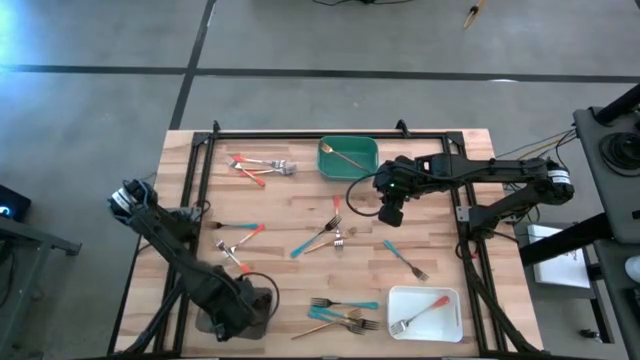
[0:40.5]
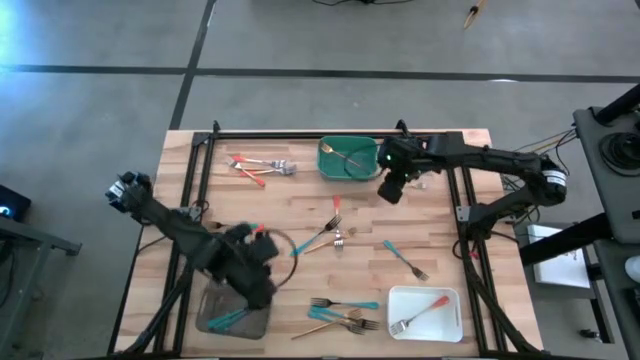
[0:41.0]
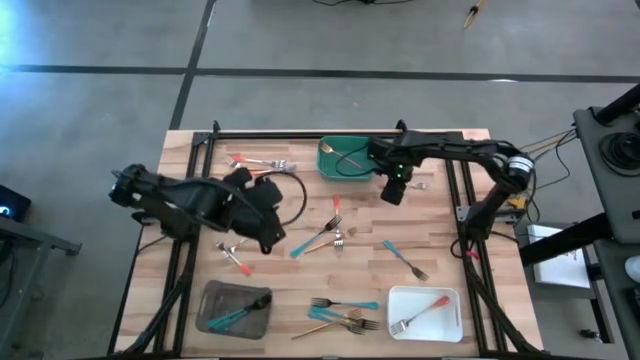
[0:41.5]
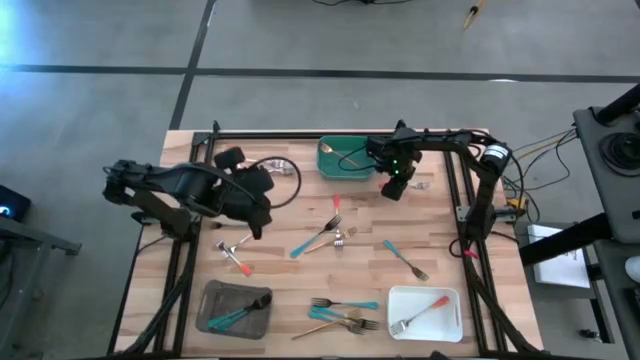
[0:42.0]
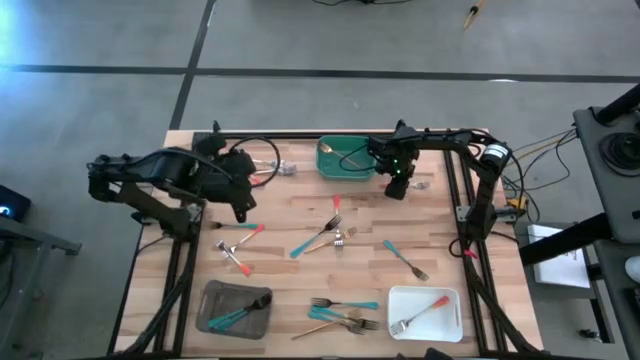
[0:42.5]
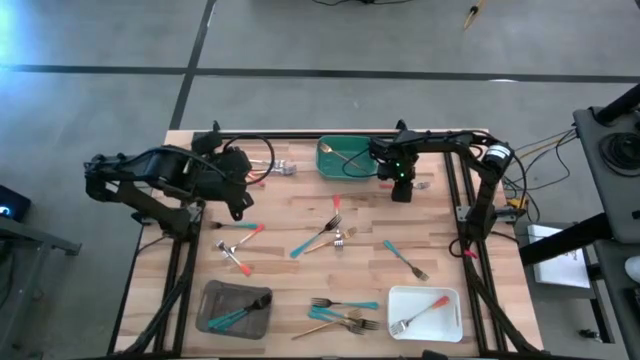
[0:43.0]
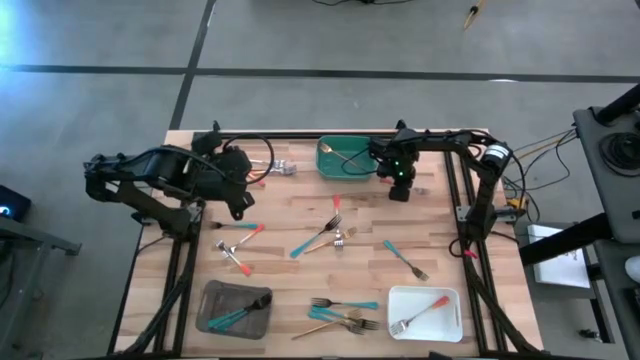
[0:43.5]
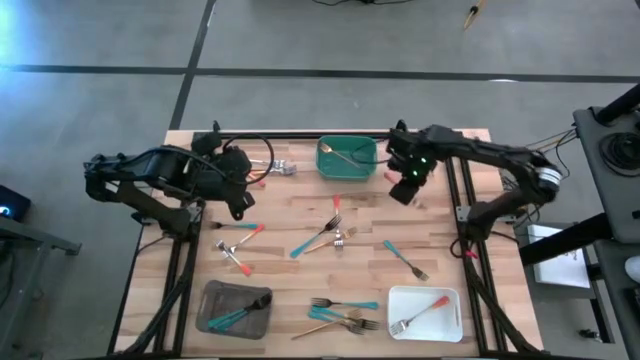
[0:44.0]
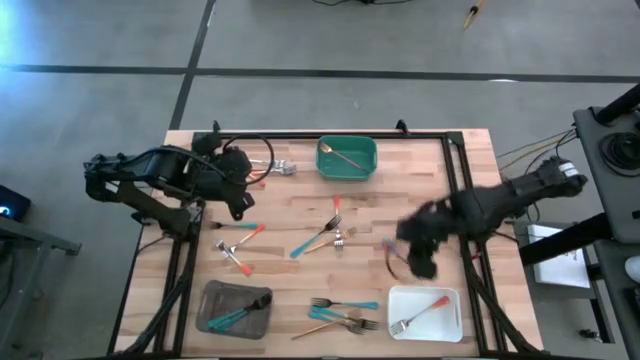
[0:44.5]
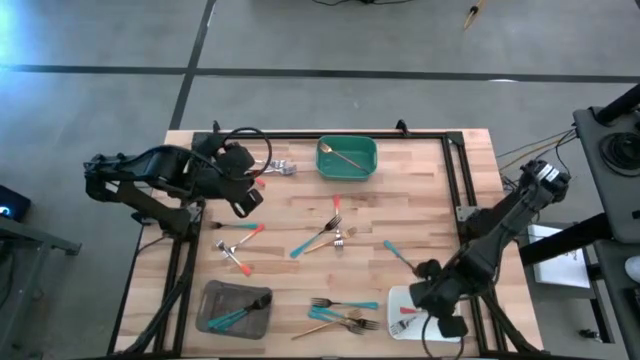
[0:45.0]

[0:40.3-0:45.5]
Task: Sort silverware by color (type)
Put the orange fork into the white bin

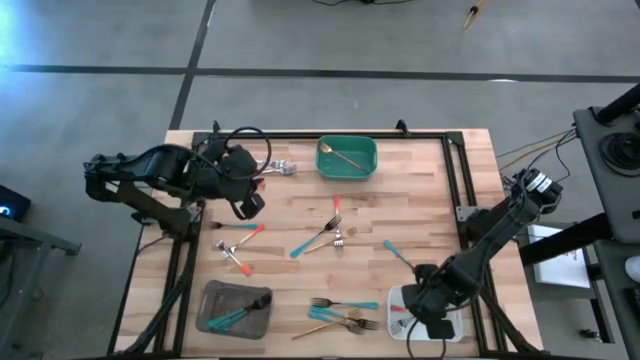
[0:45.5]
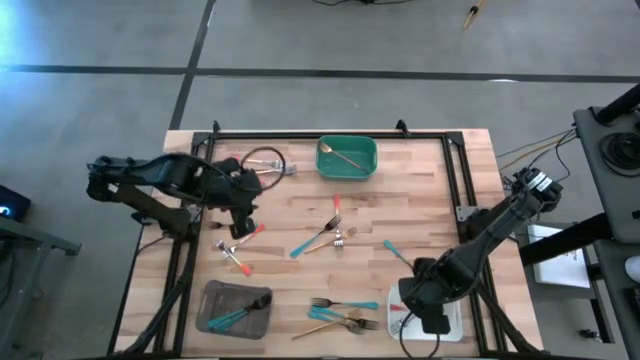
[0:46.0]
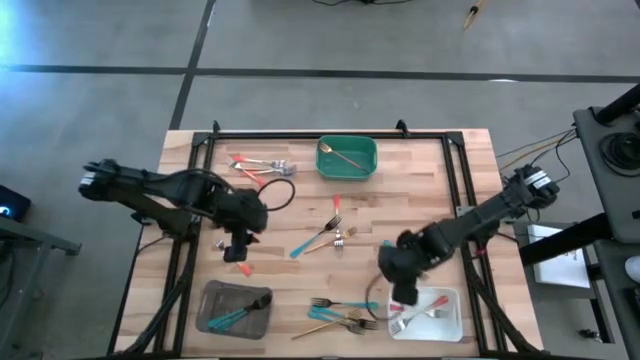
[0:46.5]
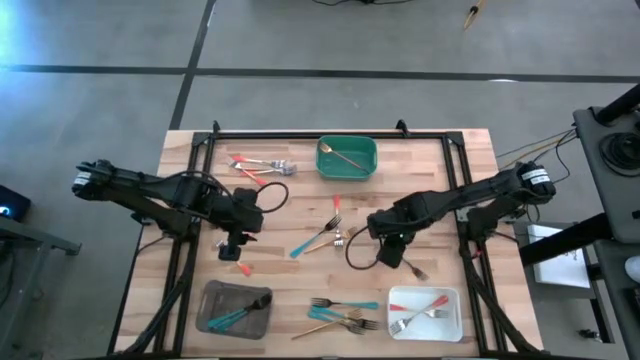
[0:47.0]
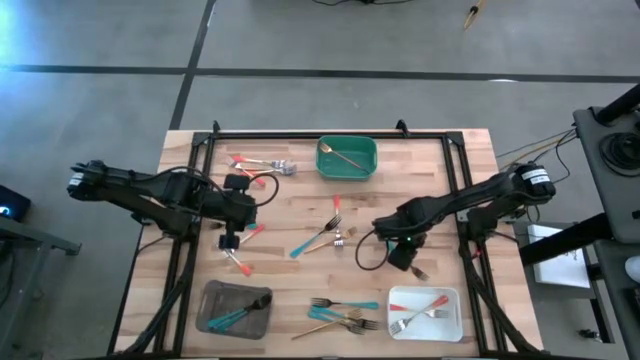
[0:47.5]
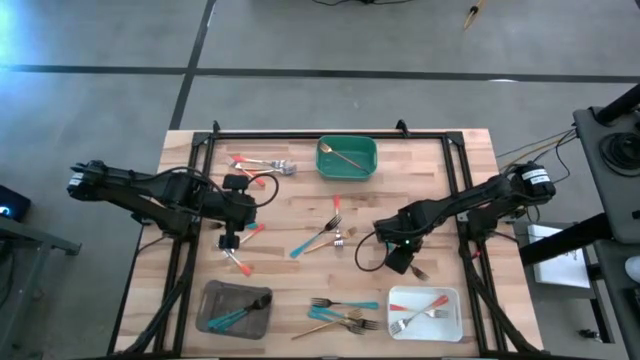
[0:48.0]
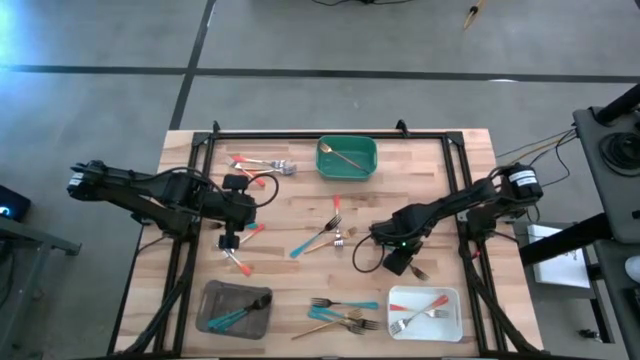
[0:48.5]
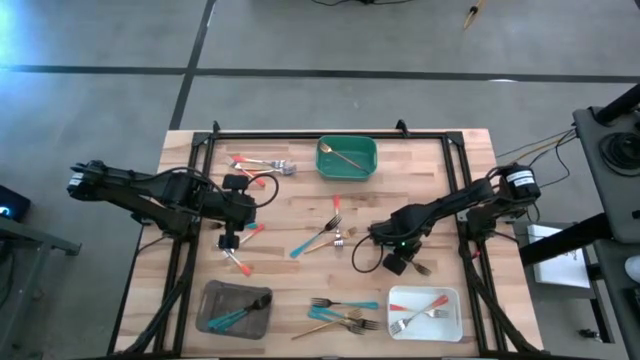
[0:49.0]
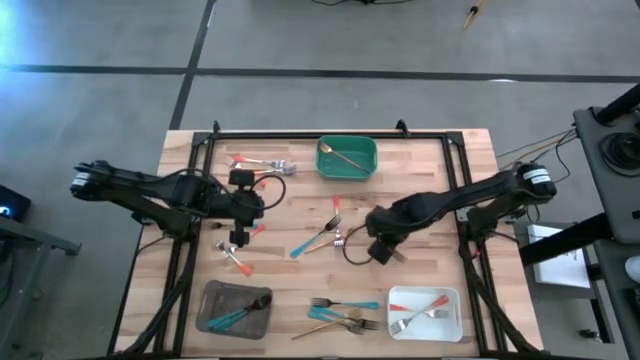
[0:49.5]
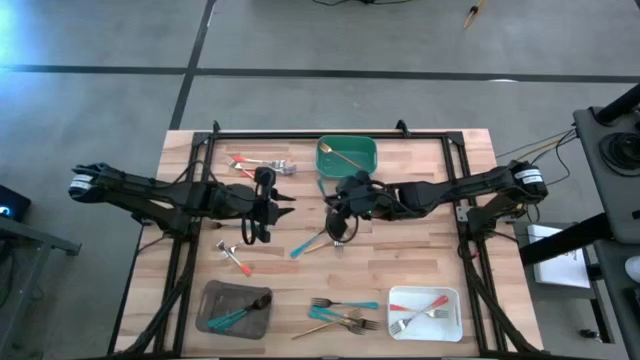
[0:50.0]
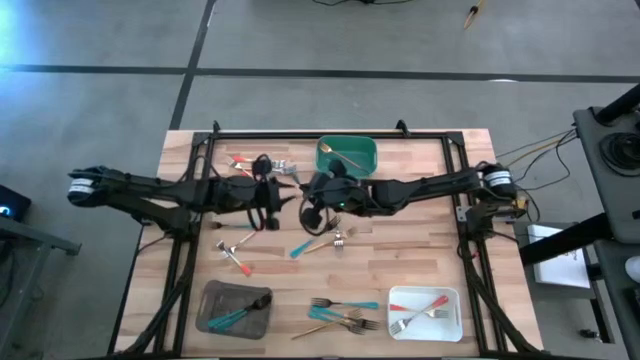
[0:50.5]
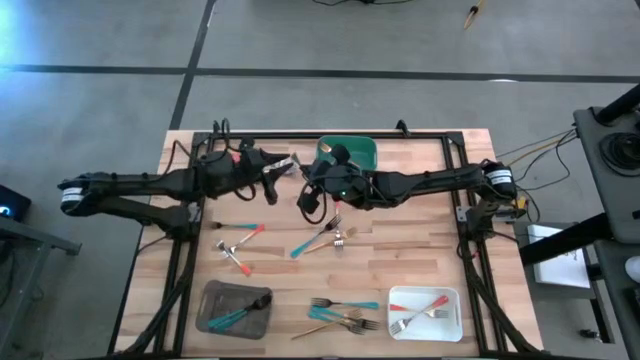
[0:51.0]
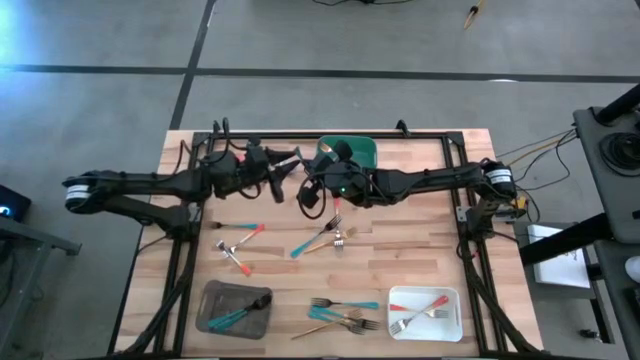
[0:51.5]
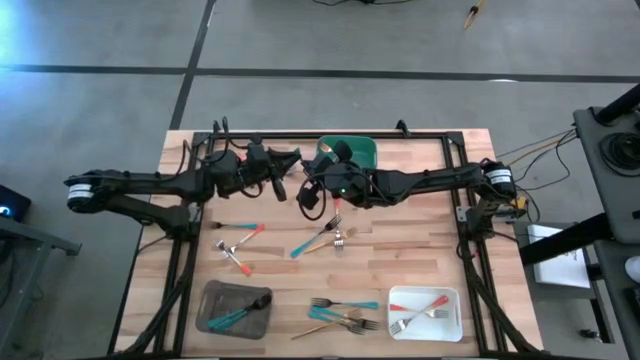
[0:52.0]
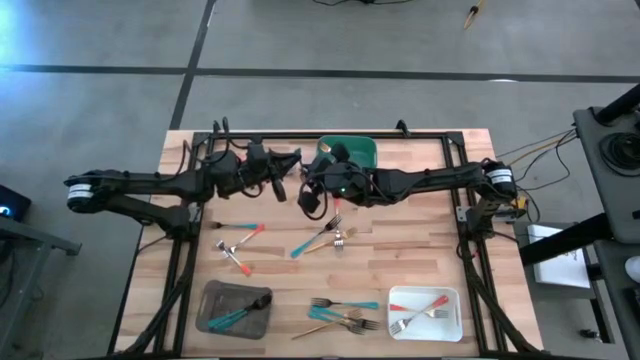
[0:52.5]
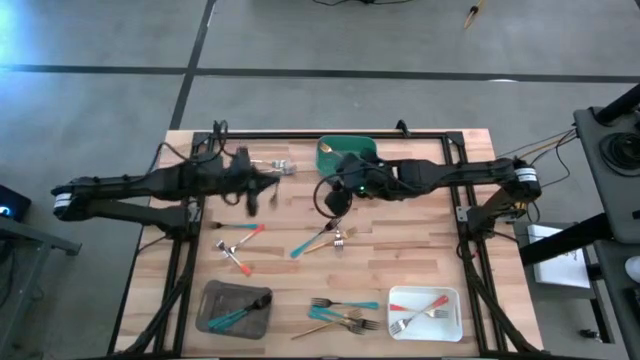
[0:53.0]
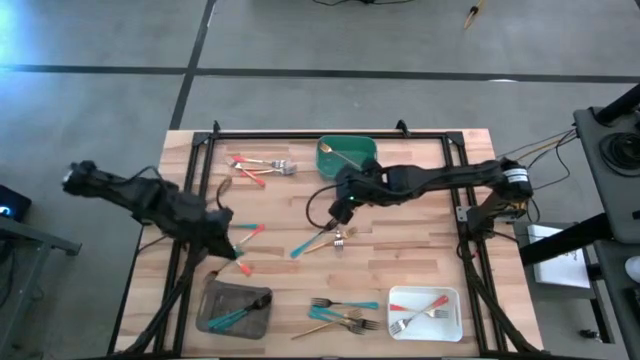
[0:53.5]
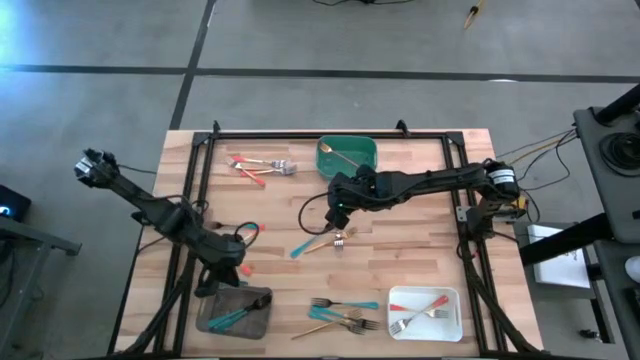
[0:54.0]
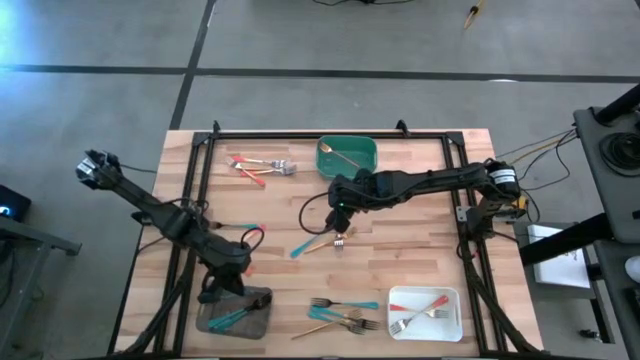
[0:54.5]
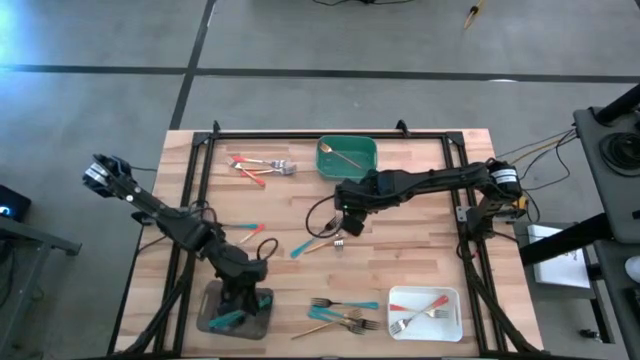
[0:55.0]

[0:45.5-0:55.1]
Put the blue fork into the black bin

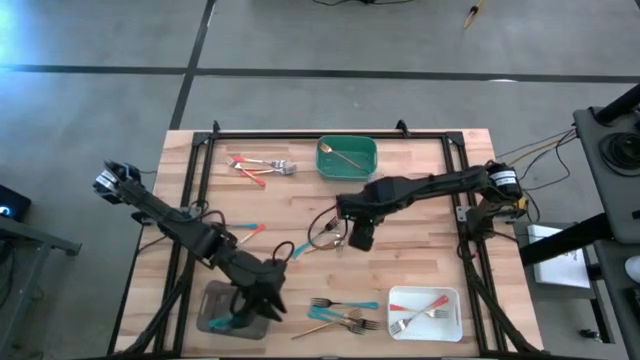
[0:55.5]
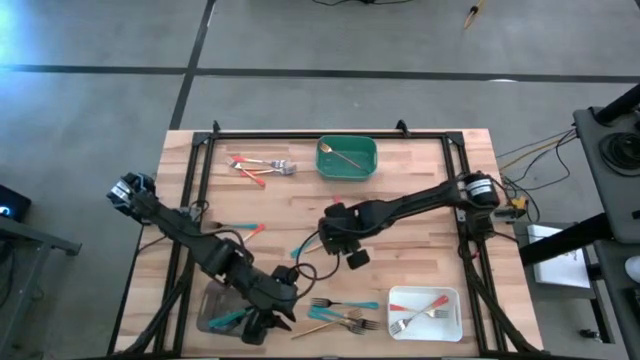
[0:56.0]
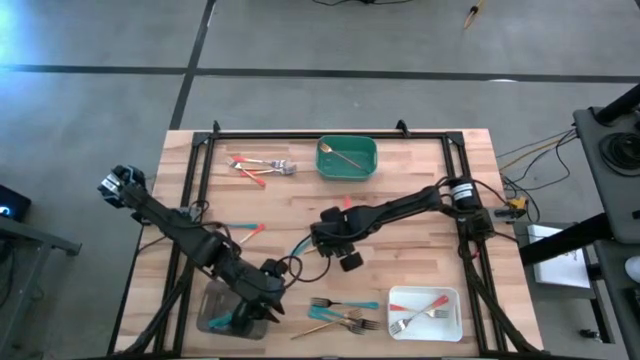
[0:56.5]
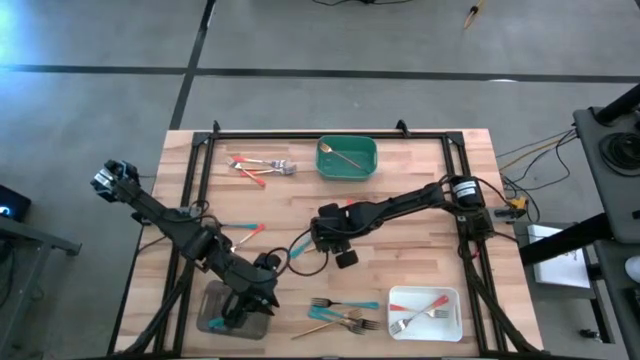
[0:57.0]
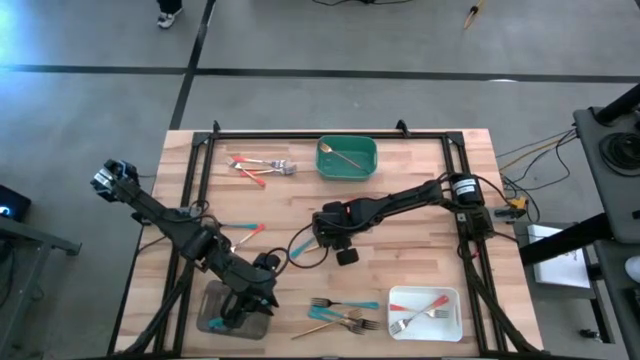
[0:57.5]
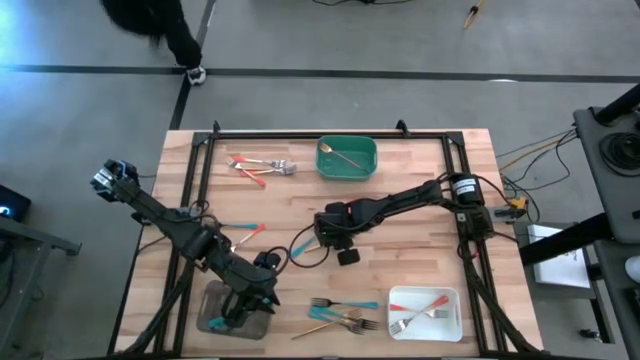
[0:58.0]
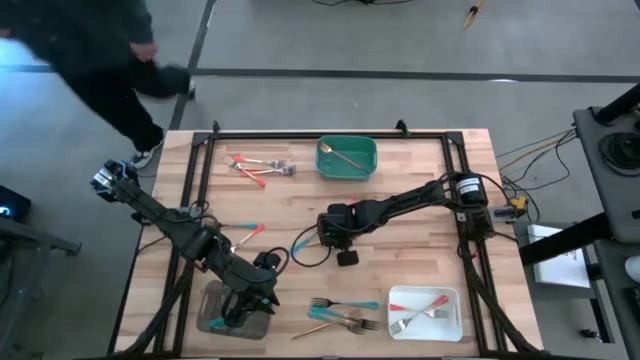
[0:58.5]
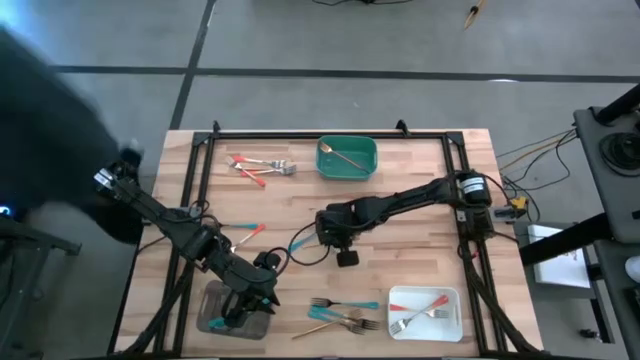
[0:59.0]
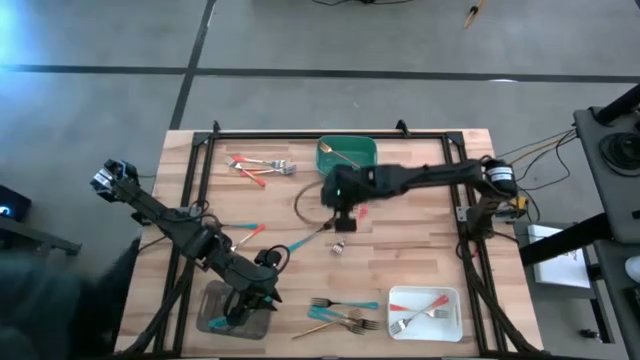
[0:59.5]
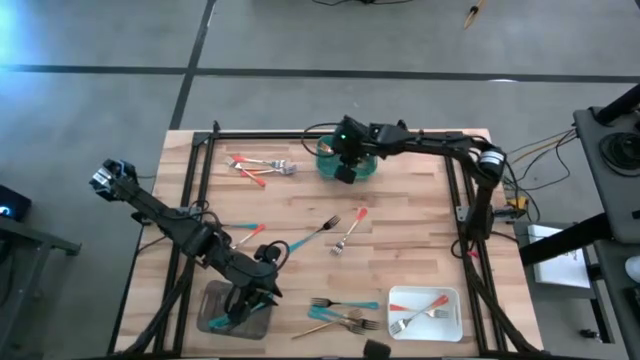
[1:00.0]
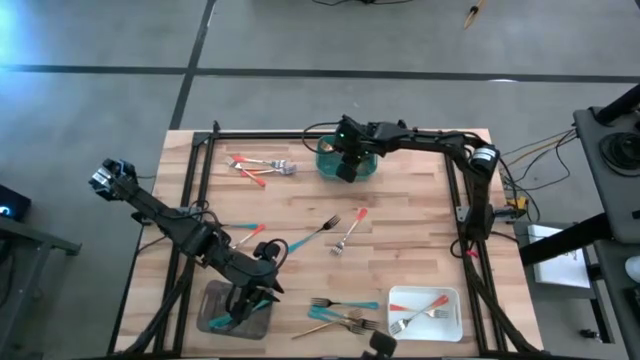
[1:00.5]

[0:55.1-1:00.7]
Put the gold fork into the blue bin

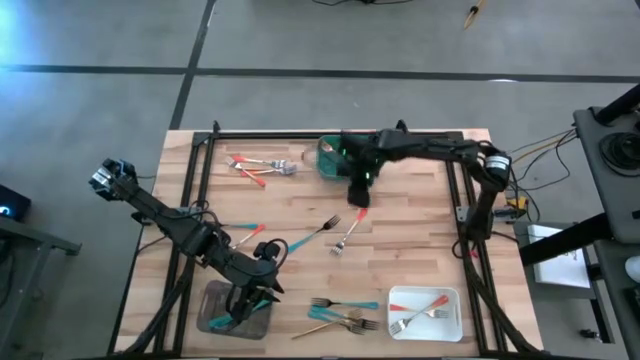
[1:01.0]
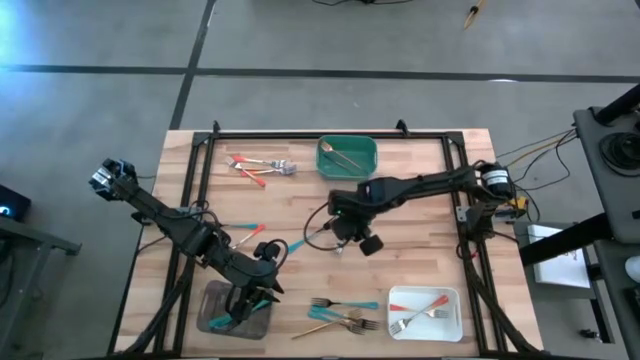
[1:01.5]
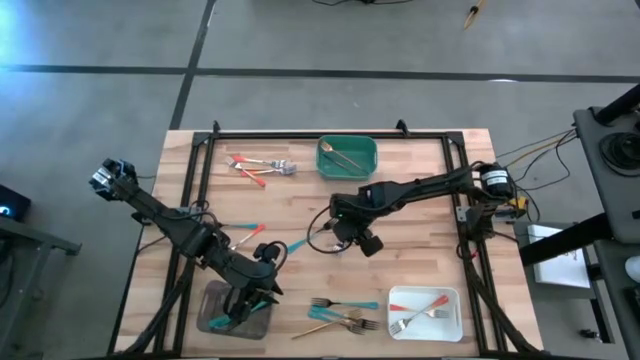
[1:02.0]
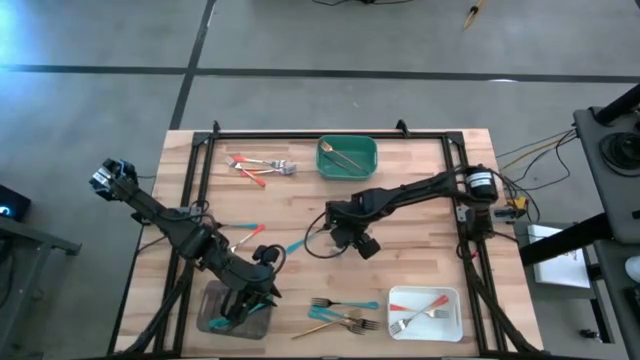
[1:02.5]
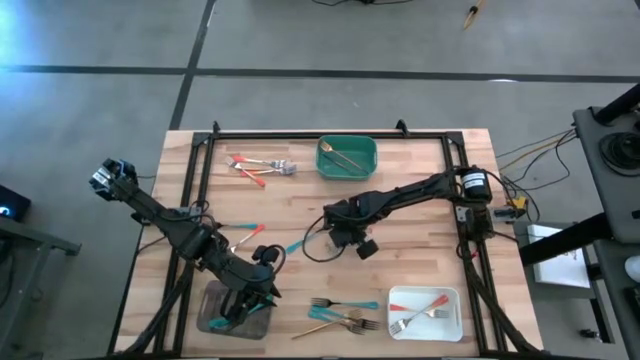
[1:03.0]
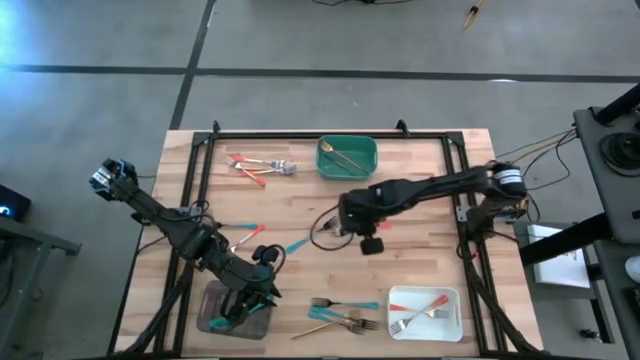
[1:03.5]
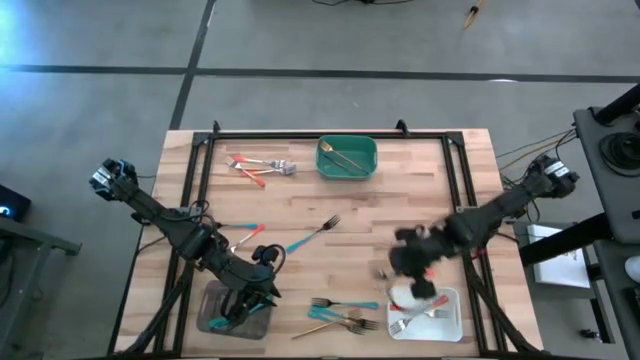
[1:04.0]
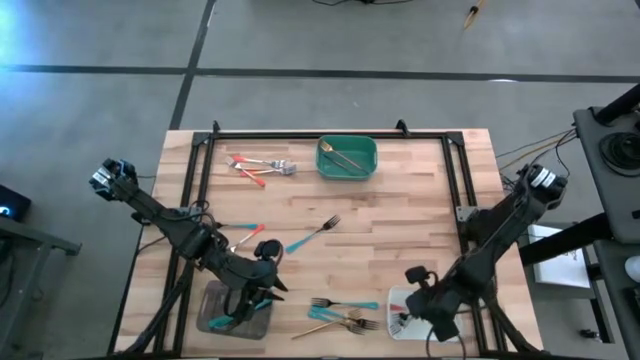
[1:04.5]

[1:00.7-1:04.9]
Put the orange fork into the white bin
